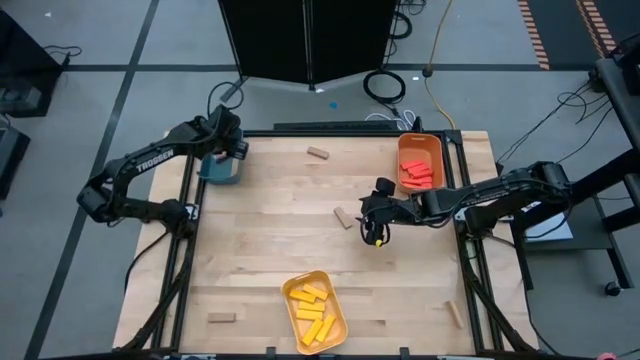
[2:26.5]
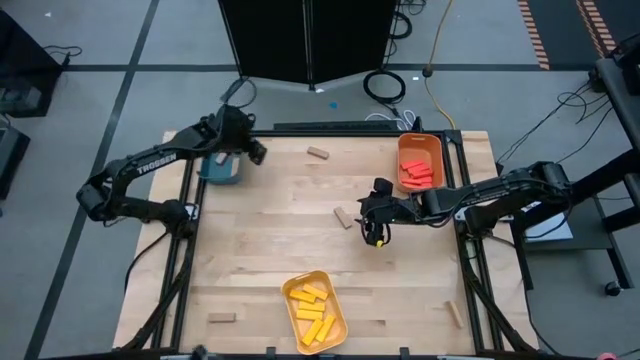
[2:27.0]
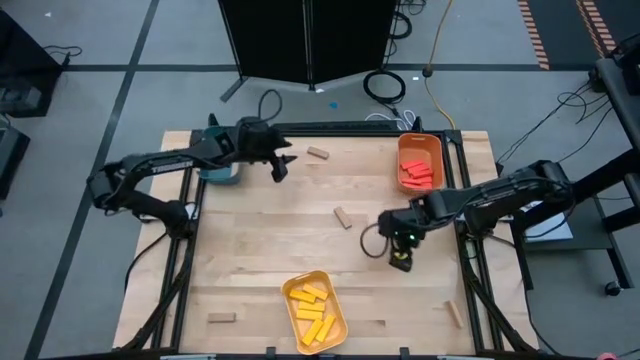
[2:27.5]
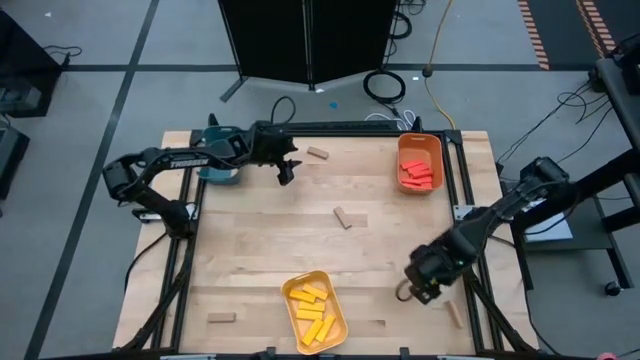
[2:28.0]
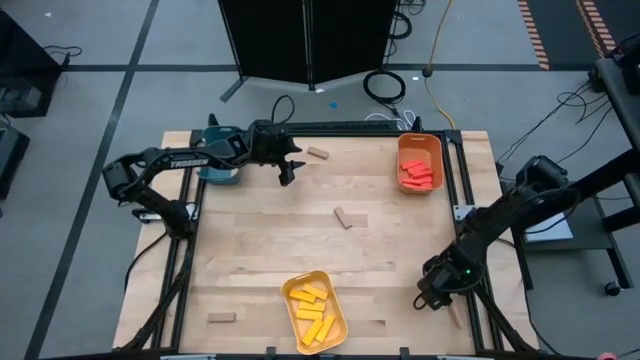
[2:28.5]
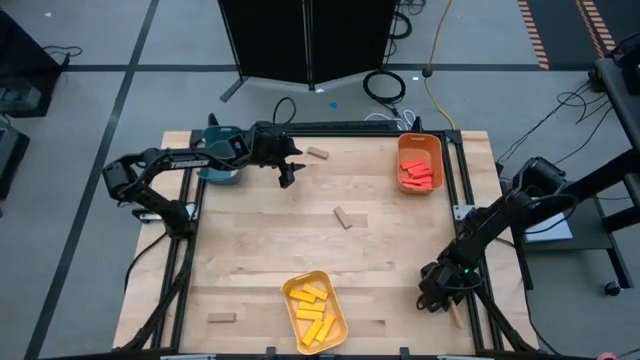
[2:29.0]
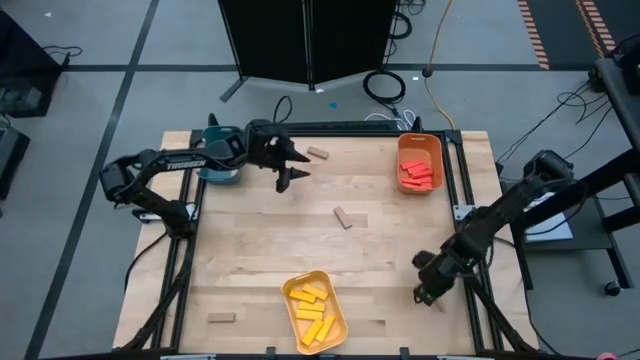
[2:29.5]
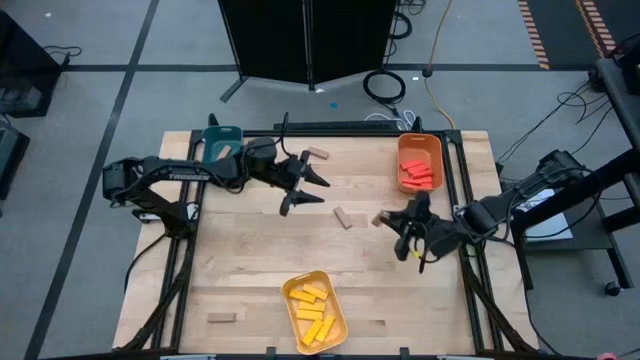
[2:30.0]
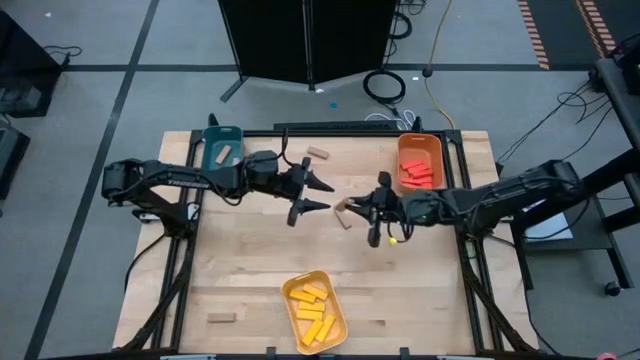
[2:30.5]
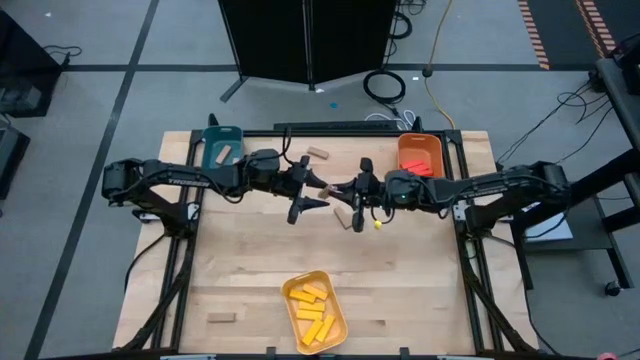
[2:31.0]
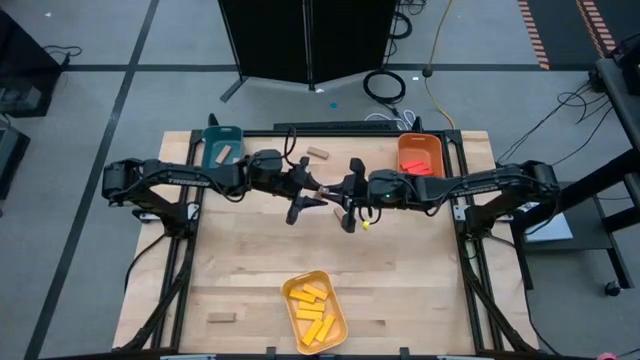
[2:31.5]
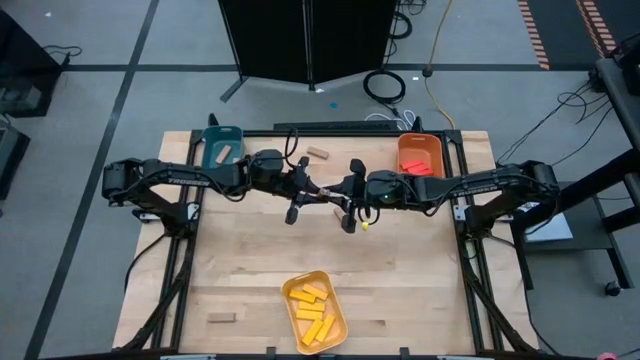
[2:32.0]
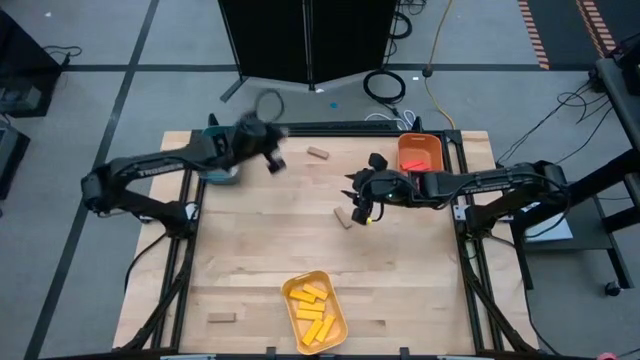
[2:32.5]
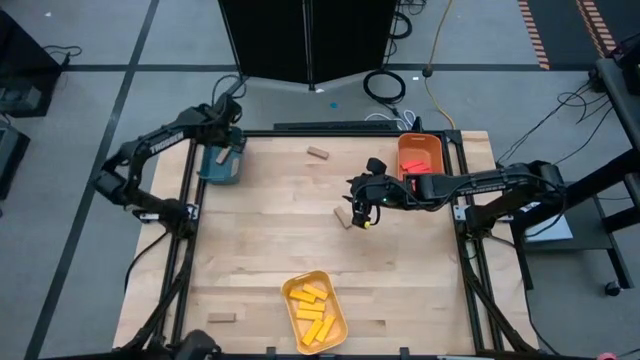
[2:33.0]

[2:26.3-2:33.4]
Task: Sort blocks
Put the brown block into the blue bin

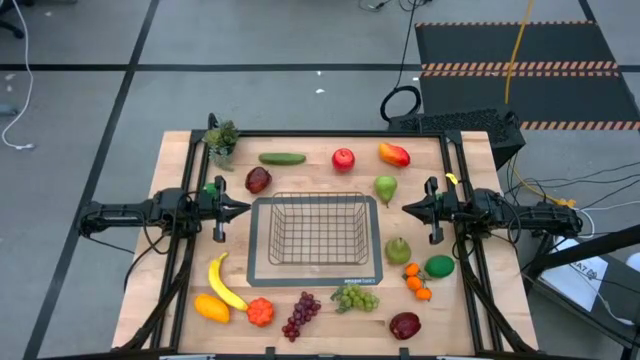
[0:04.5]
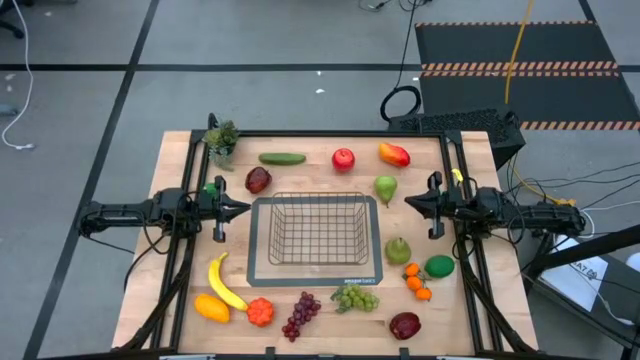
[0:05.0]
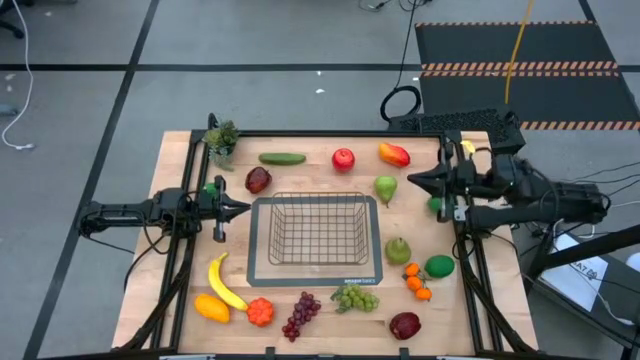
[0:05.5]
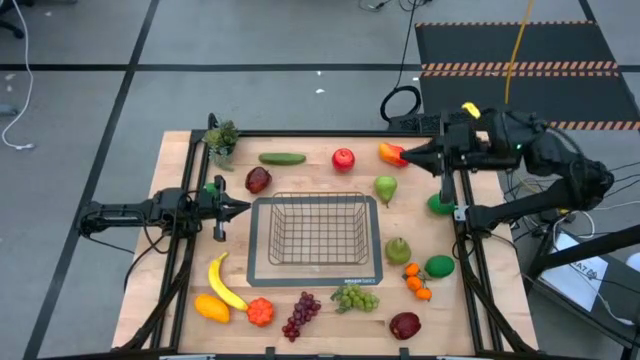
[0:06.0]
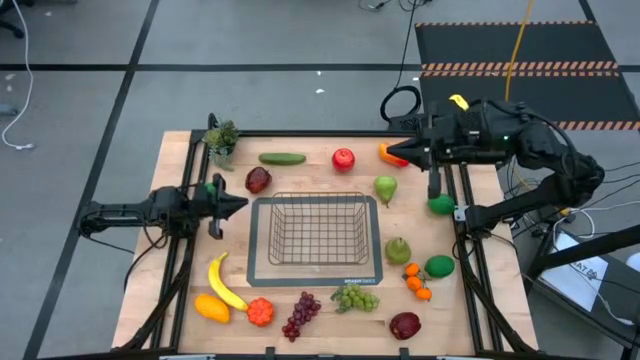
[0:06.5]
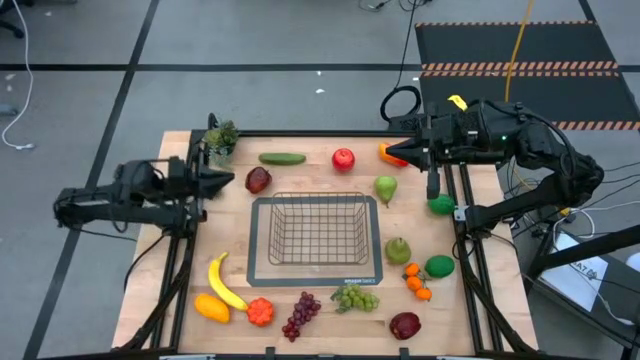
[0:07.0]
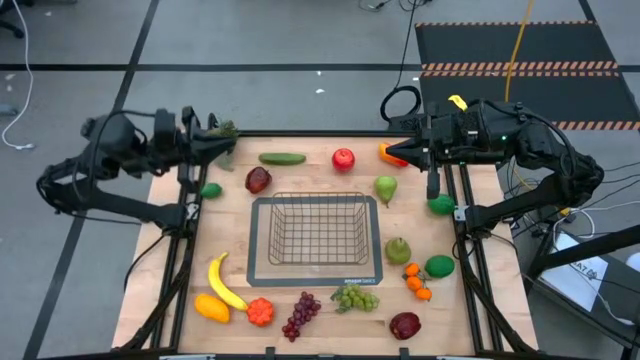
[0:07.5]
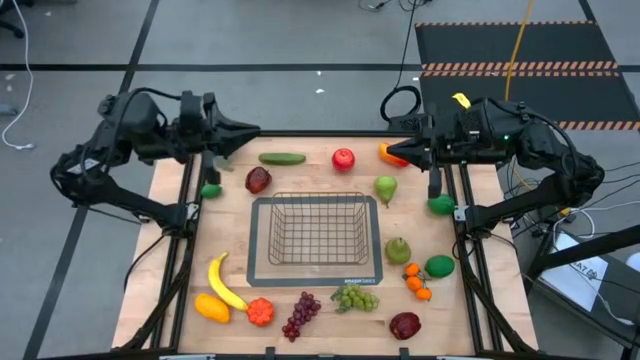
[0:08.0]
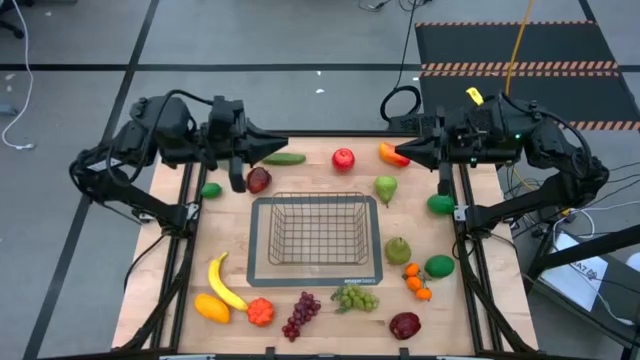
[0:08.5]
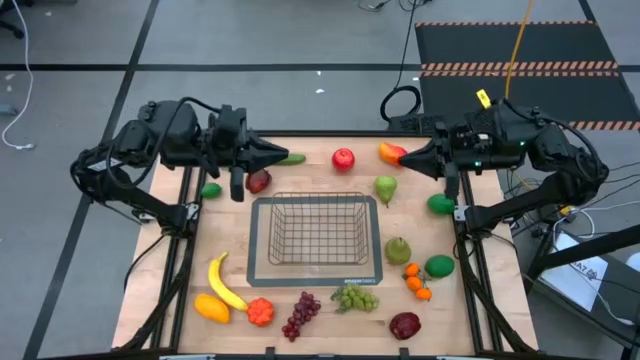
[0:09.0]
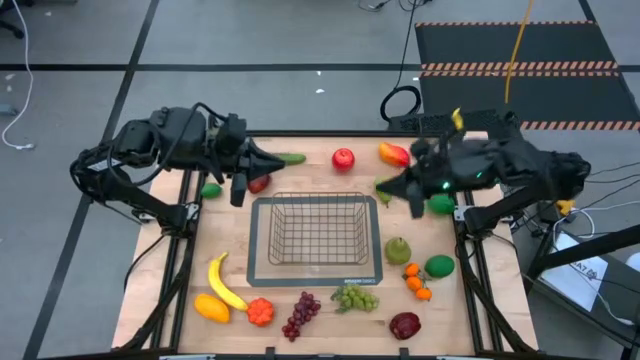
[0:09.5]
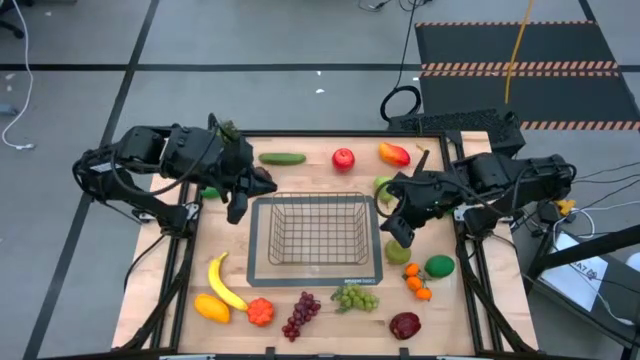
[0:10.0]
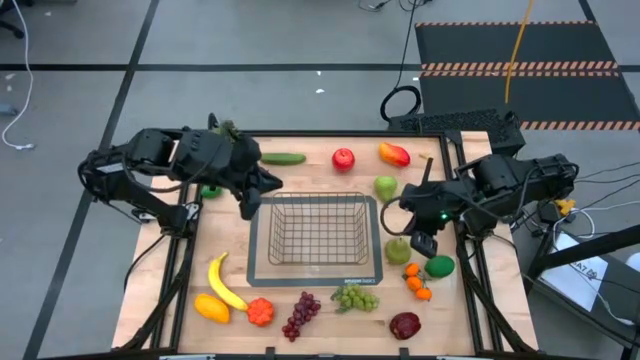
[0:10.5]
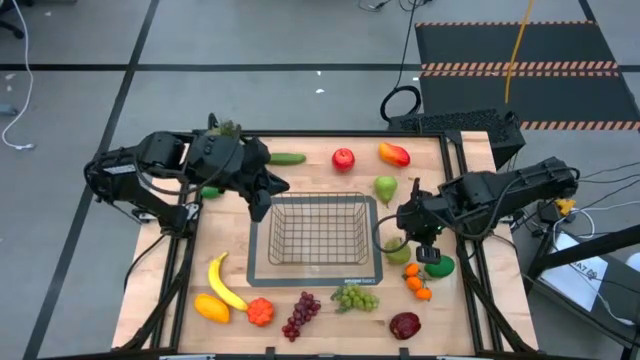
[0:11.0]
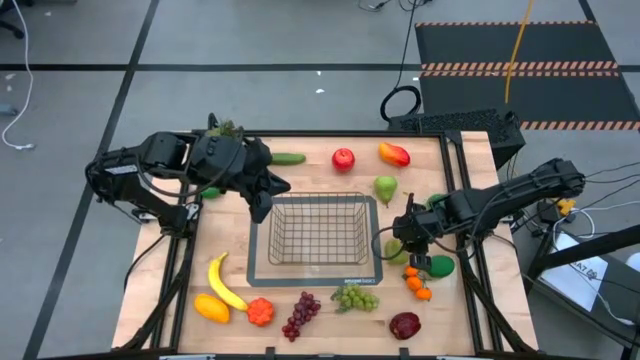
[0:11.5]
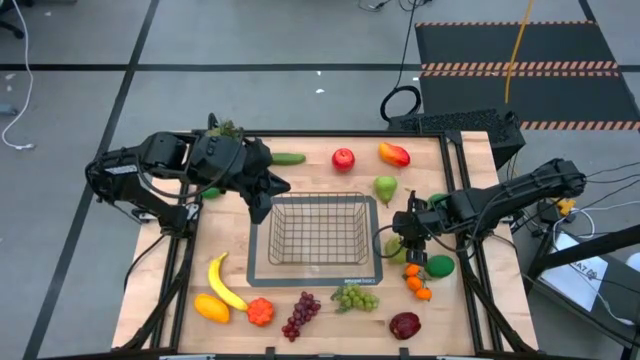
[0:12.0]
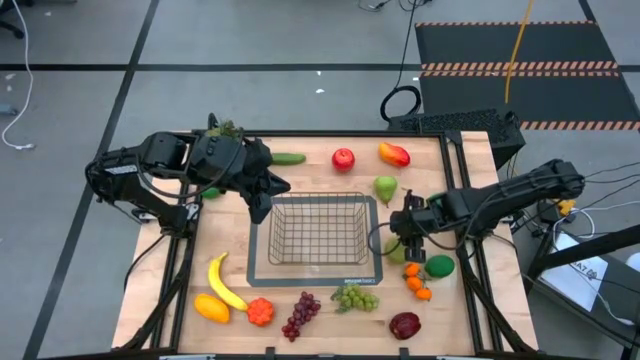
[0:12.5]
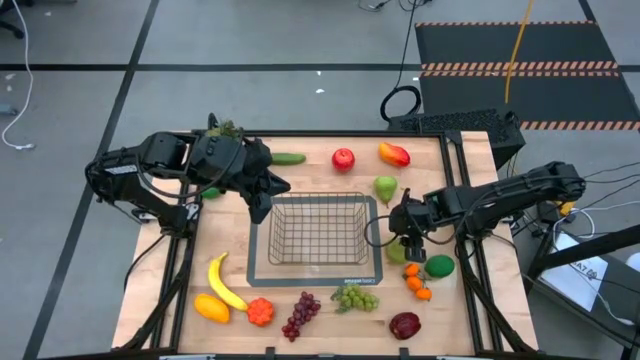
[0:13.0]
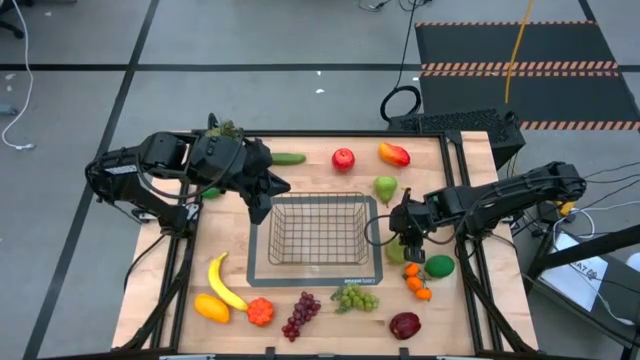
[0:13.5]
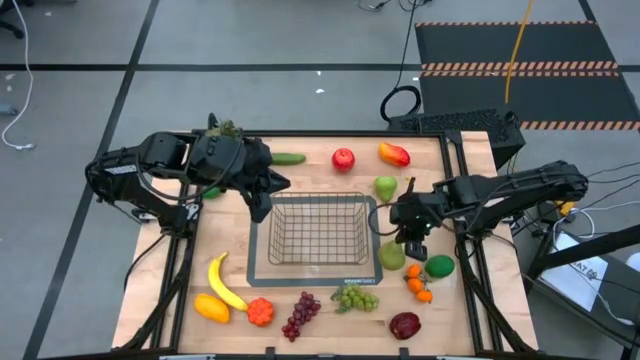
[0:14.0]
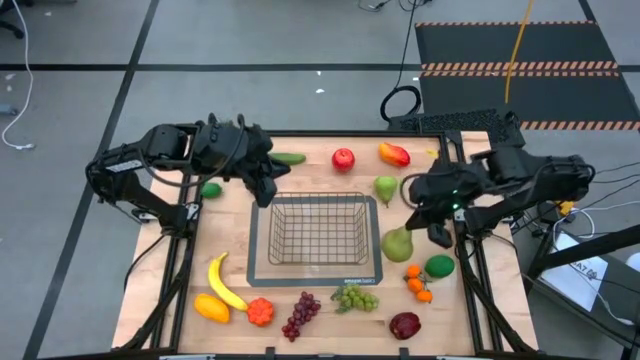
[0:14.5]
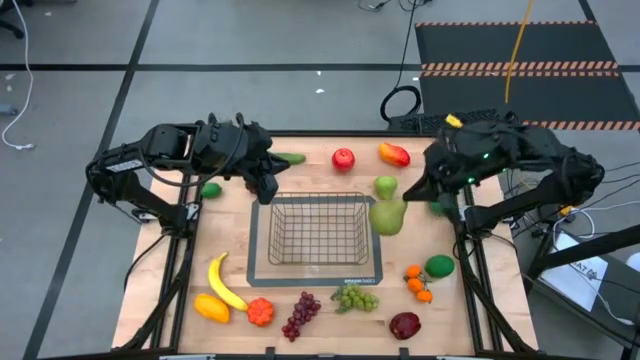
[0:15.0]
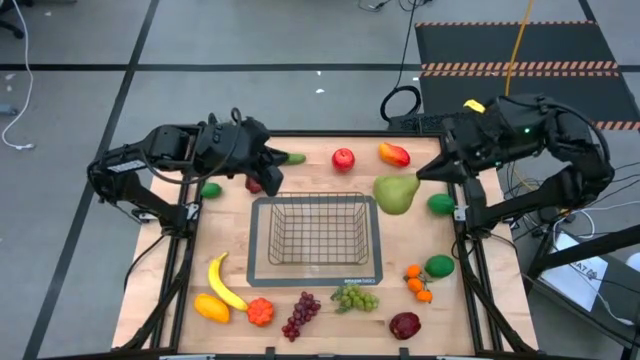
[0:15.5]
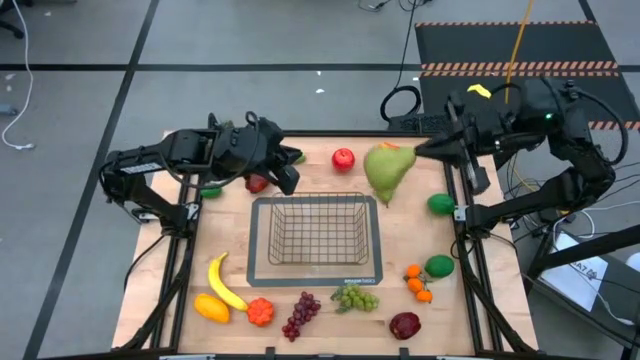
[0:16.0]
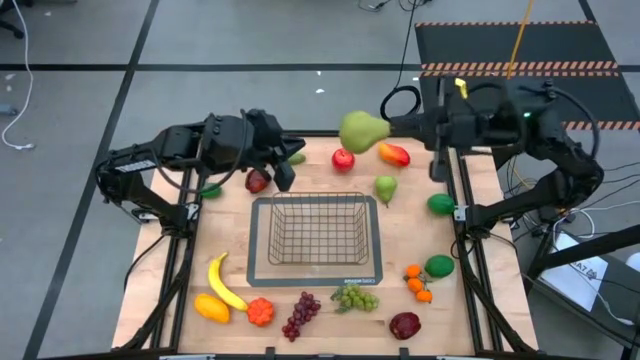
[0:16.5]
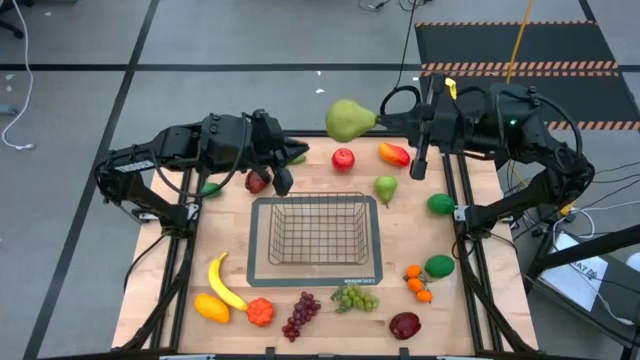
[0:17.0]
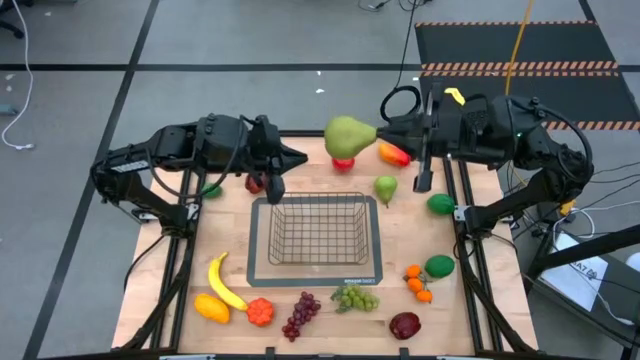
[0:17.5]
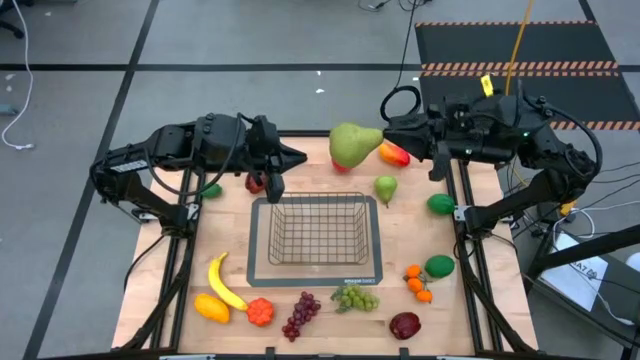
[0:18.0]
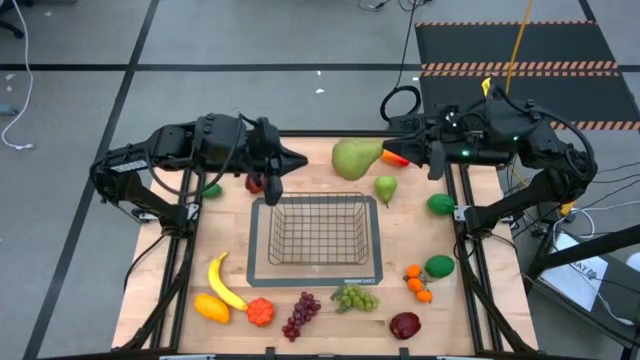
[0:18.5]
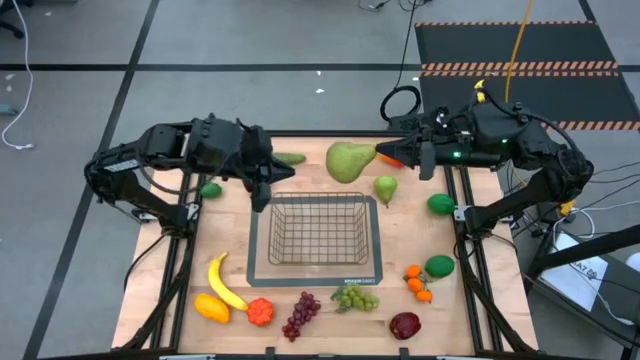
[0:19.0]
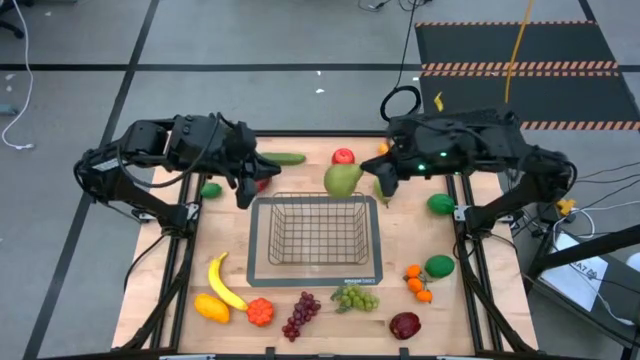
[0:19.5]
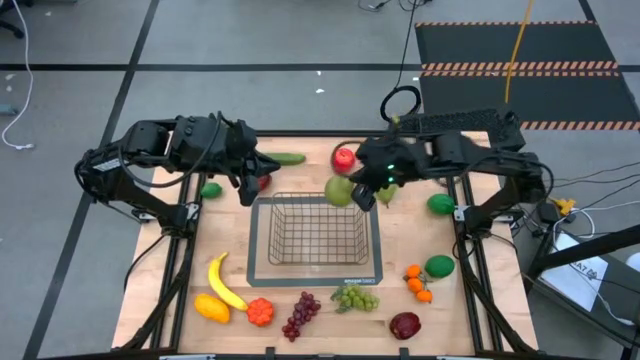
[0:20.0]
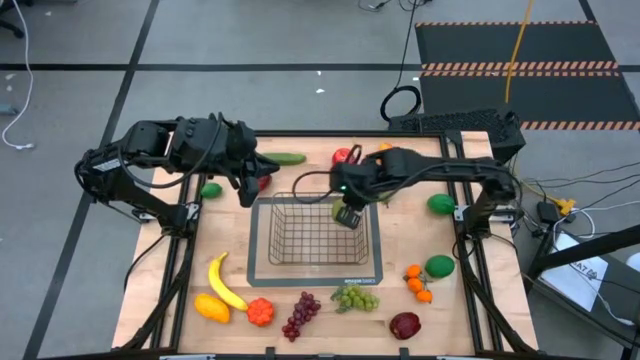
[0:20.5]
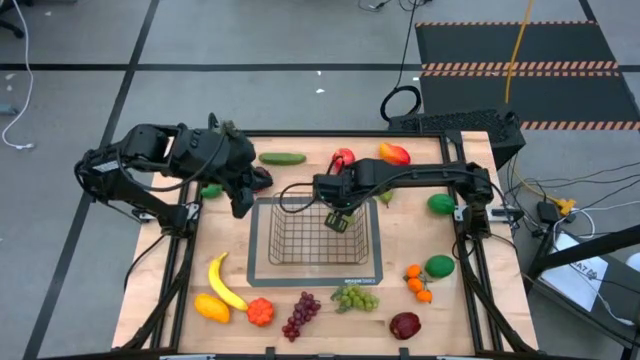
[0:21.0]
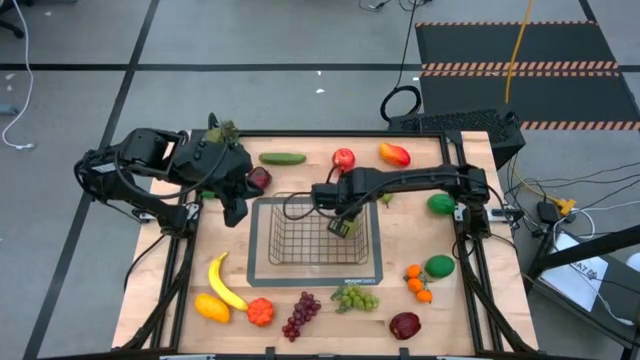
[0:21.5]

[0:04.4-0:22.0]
Task: Build produce basket
Put the bottom pear into the gold wire basket
